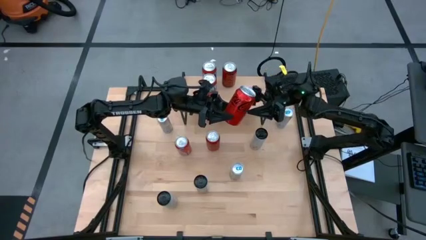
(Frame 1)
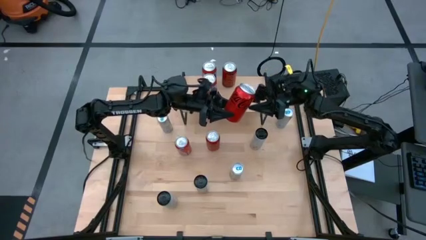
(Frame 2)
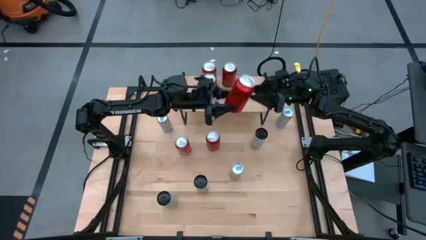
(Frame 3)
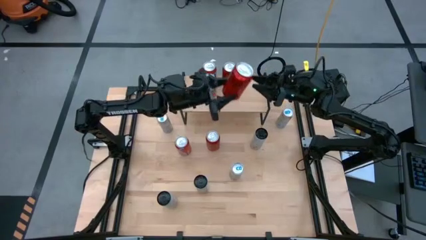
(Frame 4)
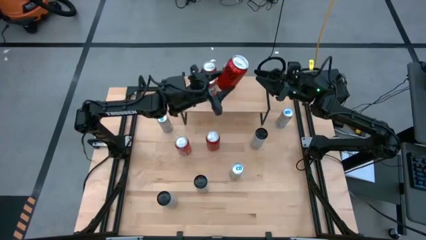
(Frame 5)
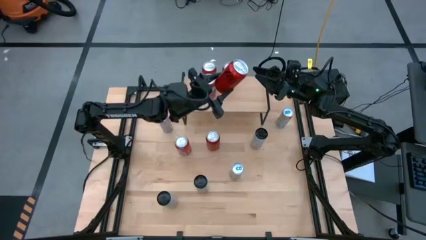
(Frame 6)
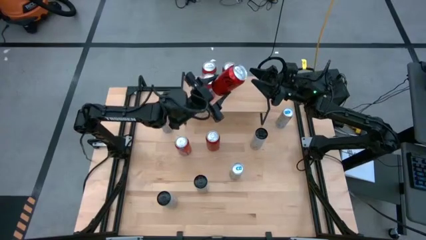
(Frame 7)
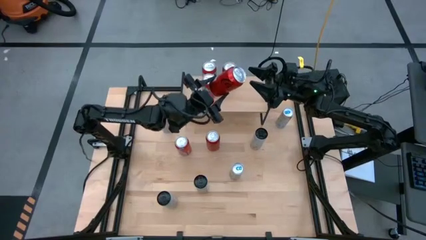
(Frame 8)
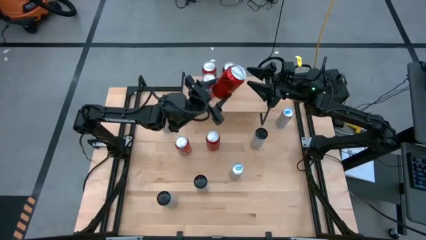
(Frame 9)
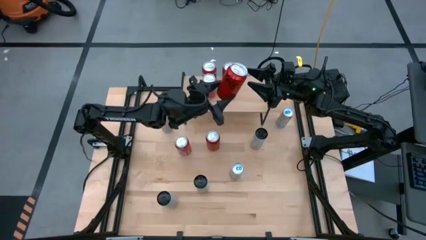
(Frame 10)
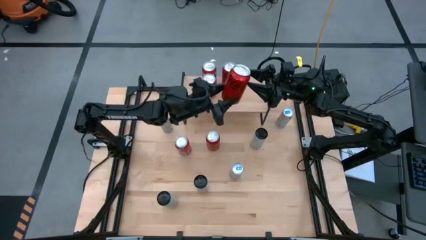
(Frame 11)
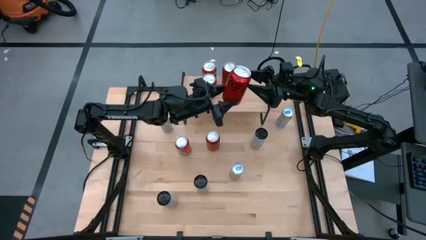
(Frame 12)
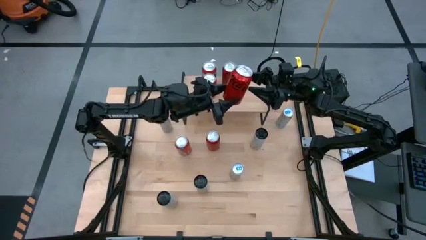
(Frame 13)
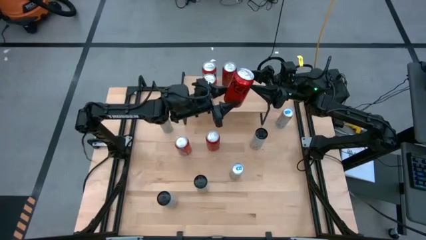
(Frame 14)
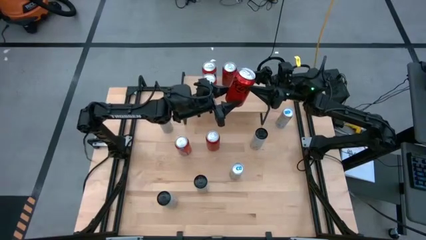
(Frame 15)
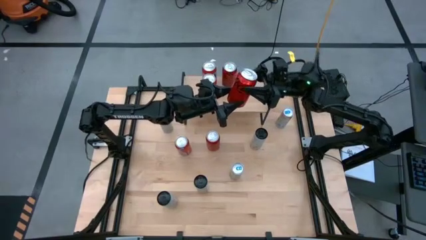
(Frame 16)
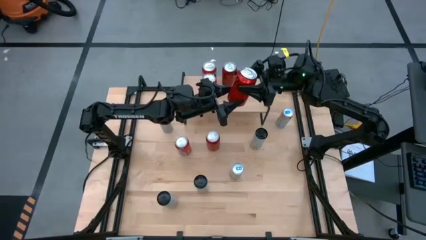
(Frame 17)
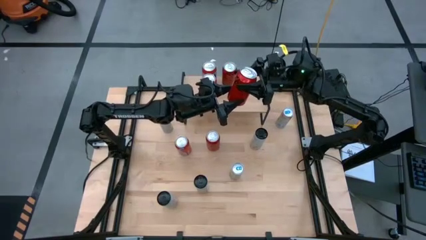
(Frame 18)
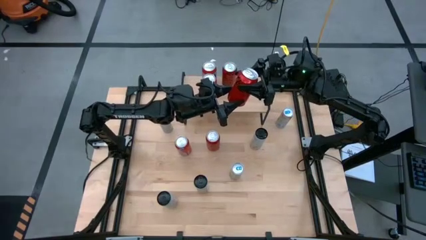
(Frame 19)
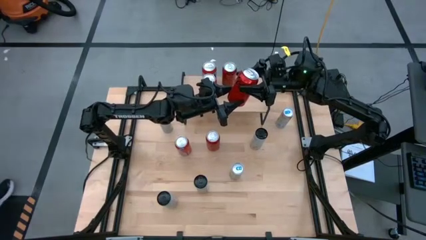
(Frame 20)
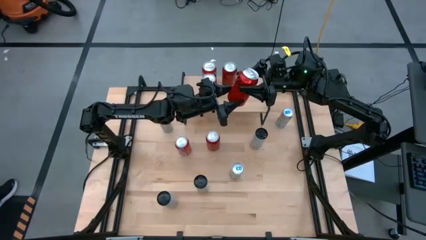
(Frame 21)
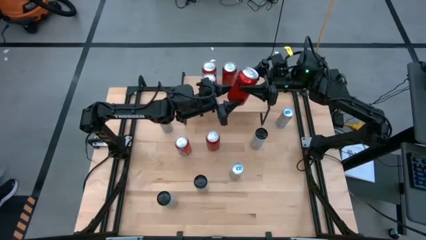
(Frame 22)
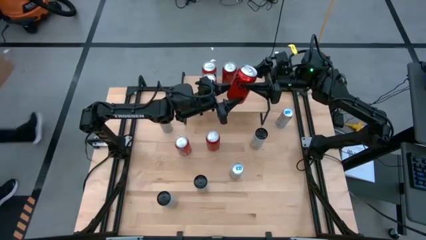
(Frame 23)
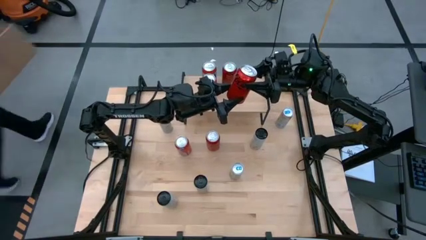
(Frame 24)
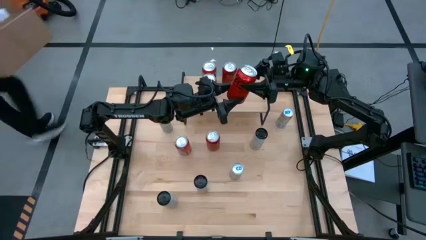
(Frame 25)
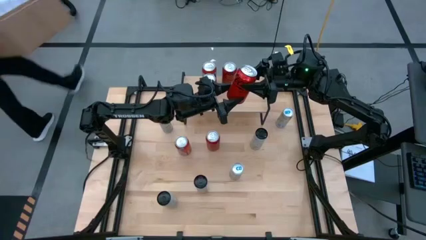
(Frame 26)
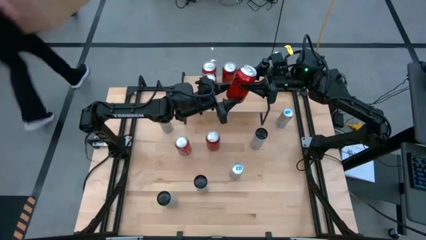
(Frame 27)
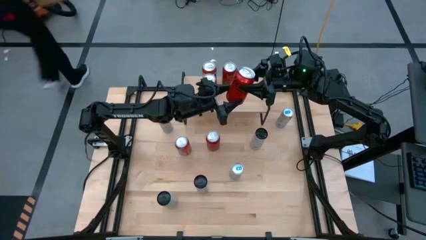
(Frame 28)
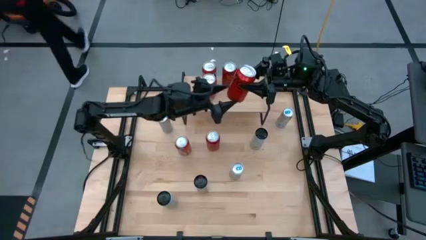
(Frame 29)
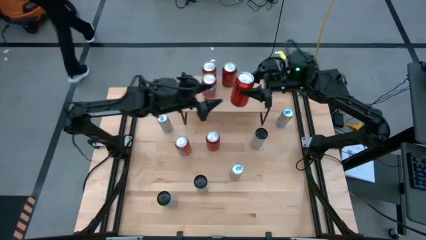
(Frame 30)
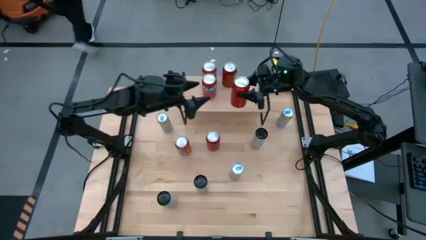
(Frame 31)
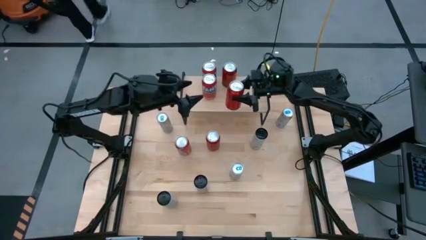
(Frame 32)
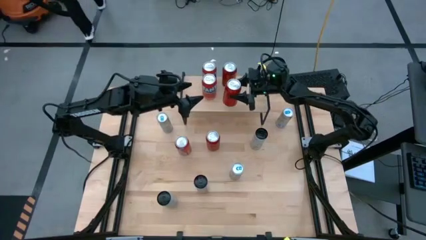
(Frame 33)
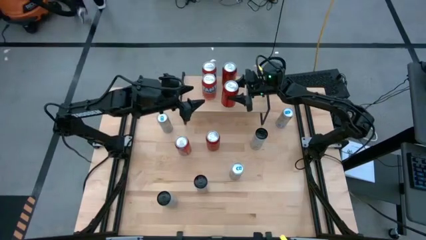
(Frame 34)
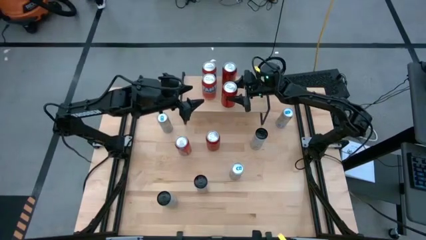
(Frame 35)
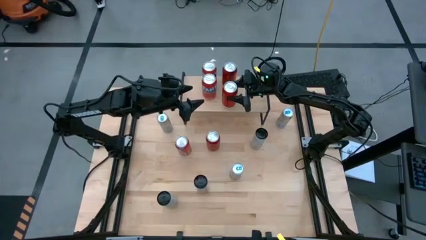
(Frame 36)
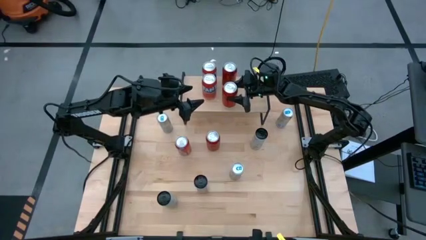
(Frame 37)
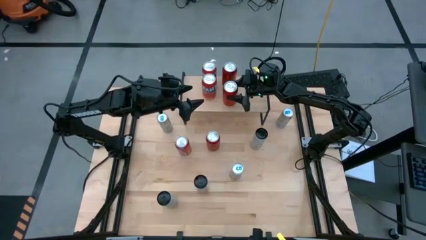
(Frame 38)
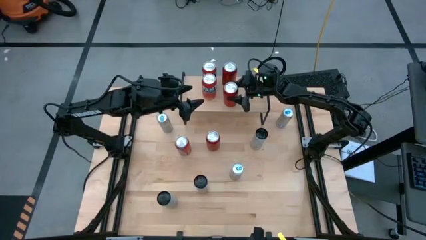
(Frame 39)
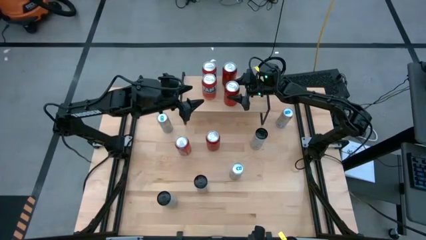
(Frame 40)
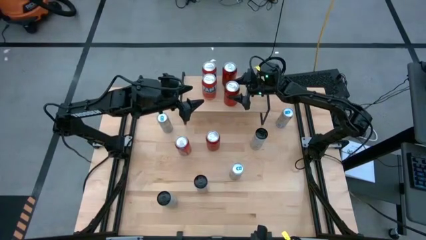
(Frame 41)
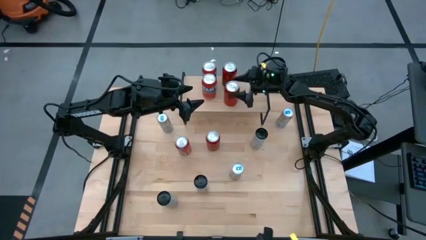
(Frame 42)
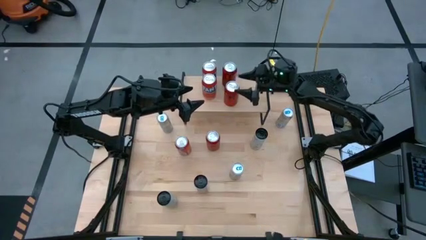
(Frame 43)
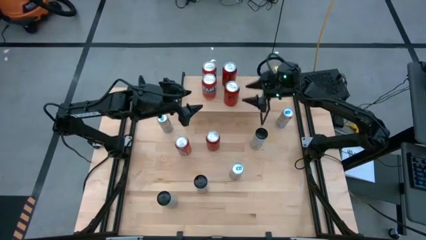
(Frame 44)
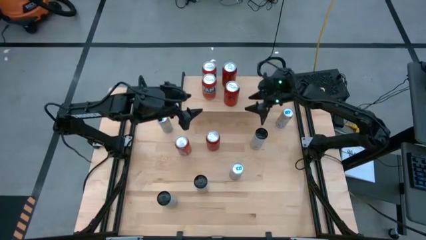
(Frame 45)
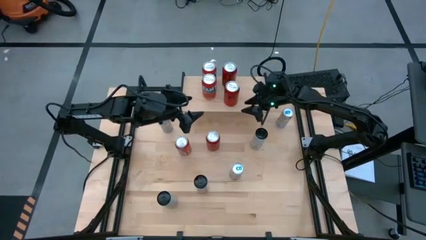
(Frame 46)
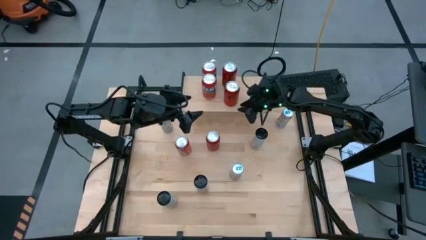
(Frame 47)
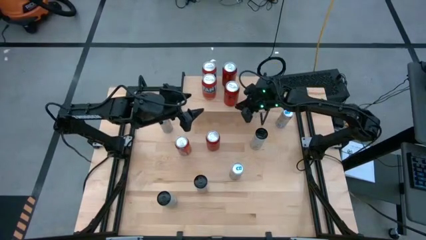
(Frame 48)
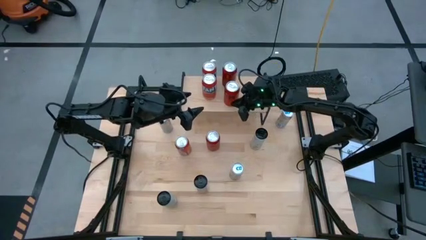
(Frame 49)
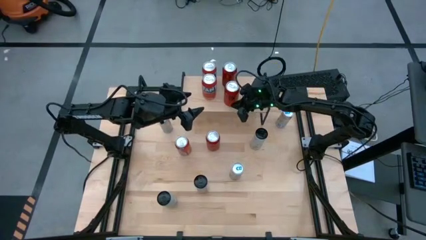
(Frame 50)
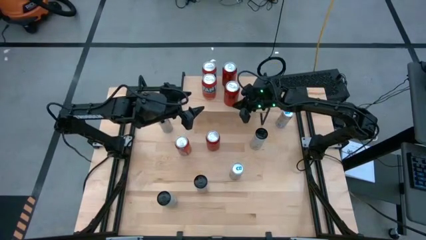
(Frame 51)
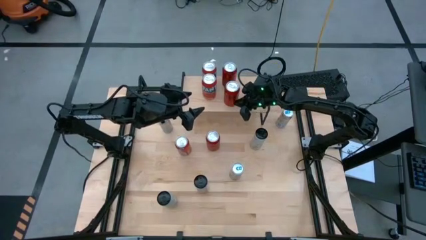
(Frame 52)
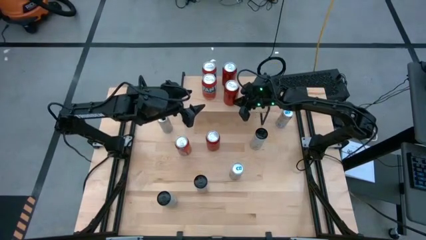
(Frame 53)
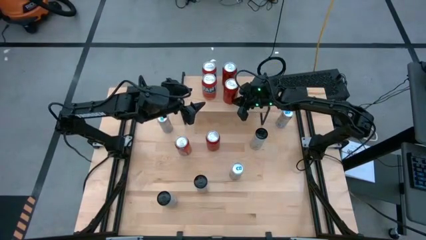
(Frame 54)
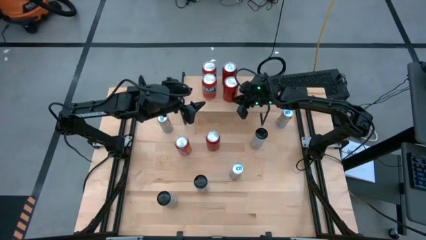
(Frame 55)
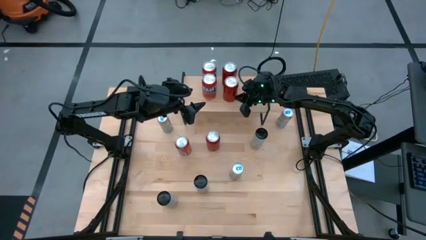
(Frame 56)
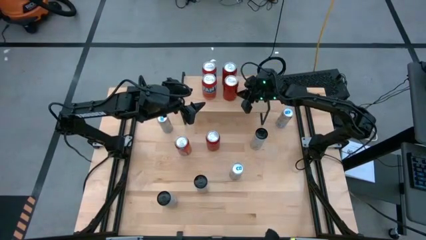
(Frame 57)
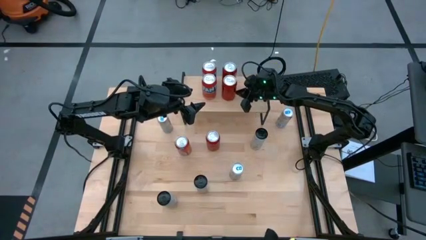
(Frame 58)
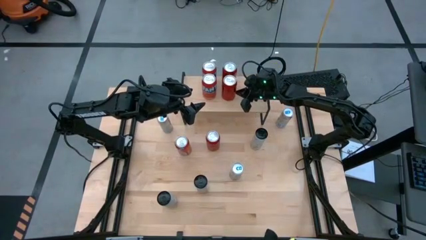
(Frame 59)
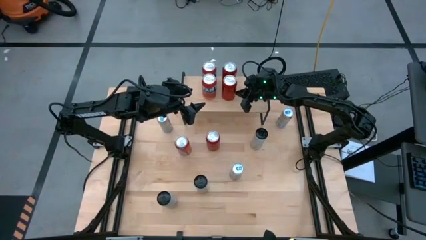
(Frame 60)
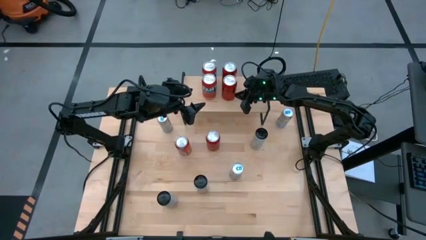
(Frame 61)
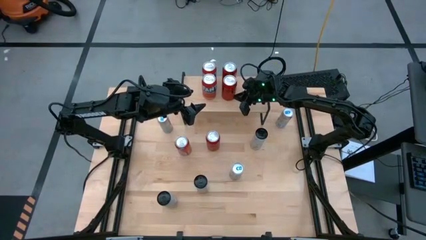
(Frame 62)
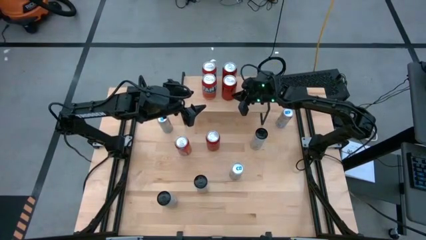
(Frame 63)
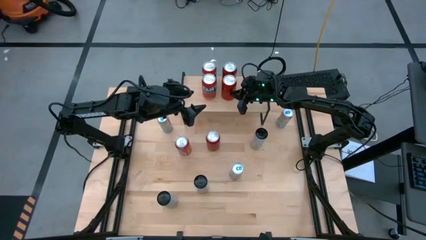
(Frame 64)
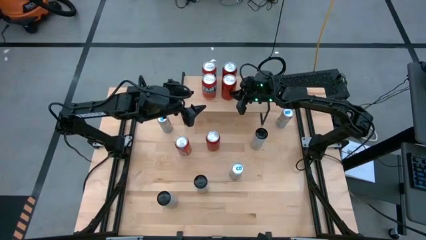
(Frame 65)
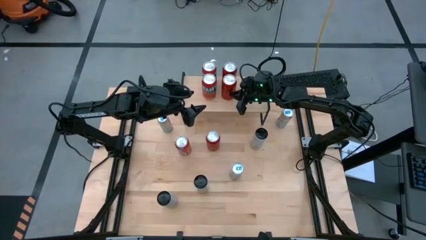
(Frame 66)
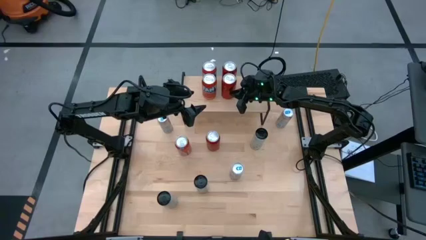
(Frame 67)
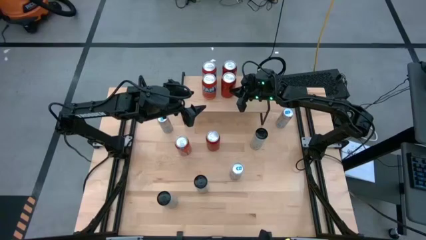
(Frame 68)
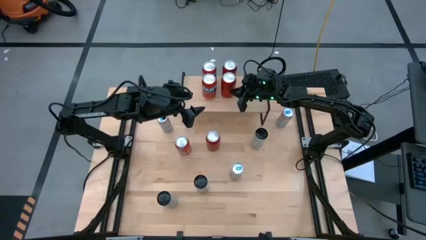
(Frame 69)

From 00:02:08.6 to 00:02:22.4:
Task: Place canned beverage on shelf
Put the bottom red-black soda can on the shelf aligned with the other red-black soda can

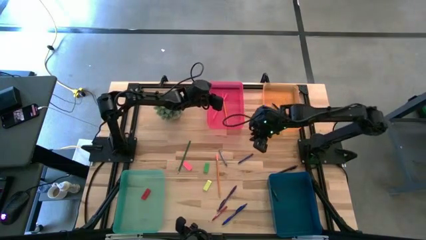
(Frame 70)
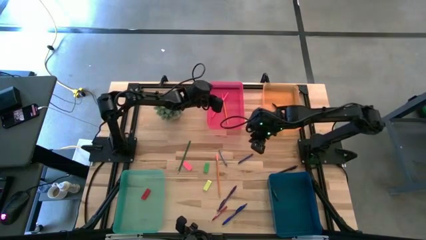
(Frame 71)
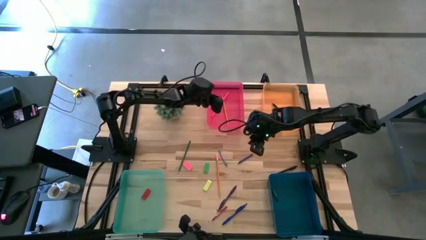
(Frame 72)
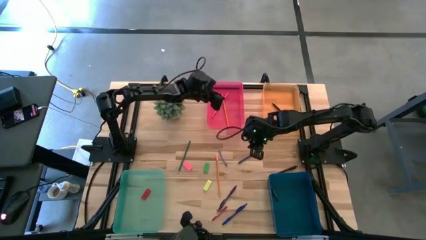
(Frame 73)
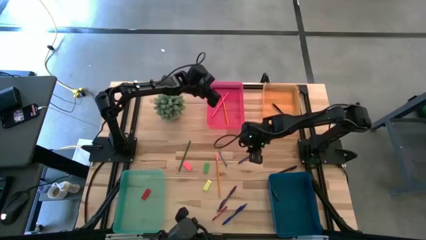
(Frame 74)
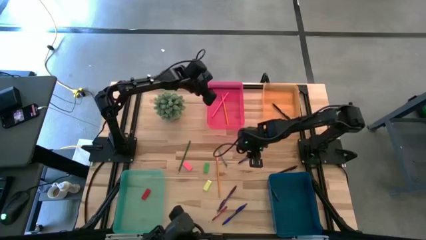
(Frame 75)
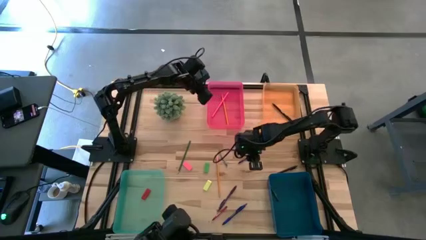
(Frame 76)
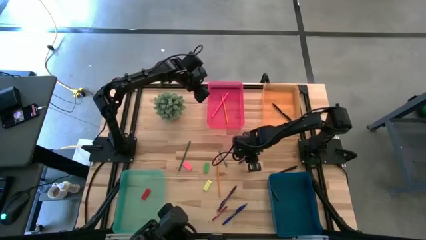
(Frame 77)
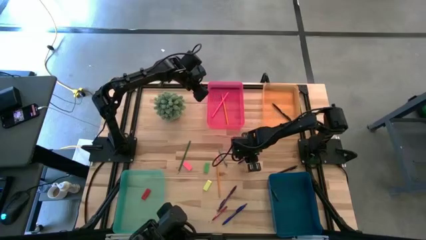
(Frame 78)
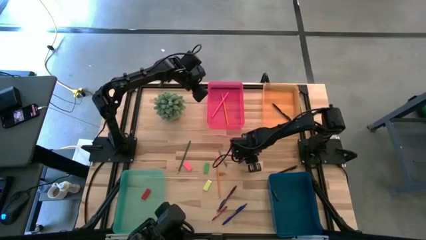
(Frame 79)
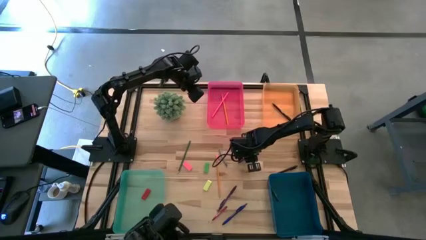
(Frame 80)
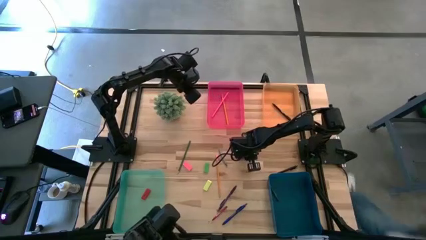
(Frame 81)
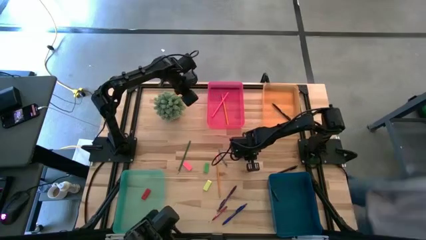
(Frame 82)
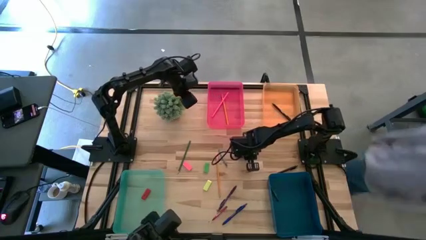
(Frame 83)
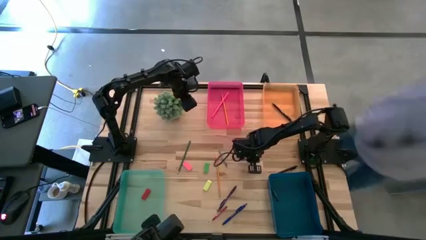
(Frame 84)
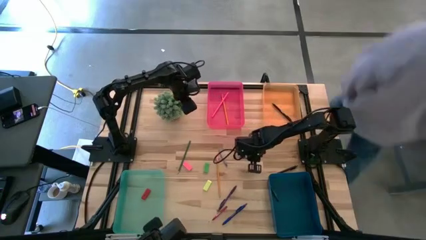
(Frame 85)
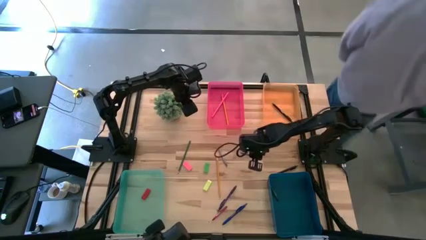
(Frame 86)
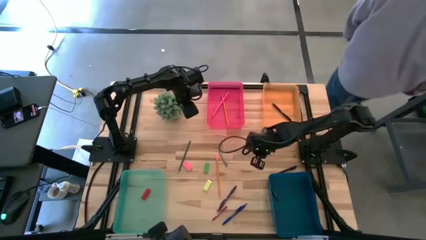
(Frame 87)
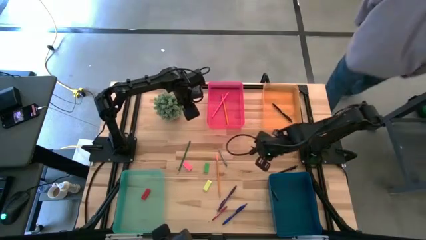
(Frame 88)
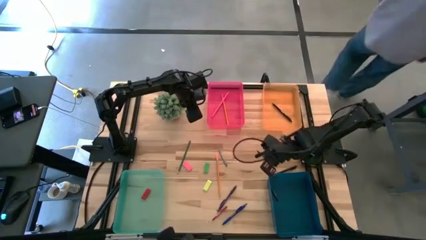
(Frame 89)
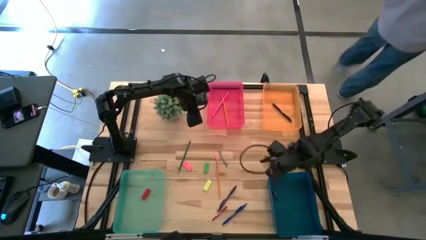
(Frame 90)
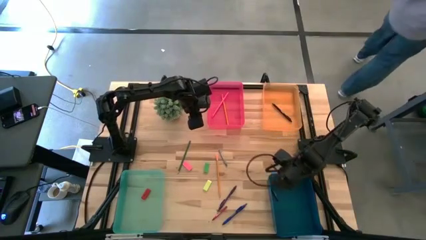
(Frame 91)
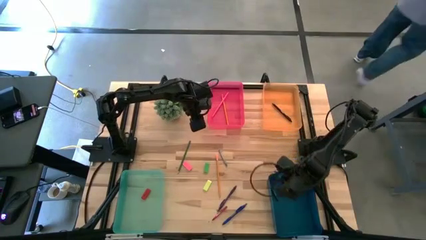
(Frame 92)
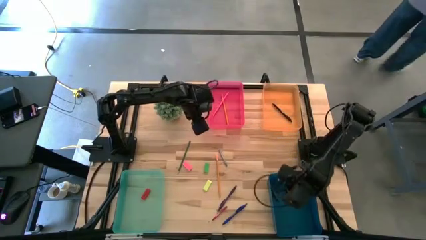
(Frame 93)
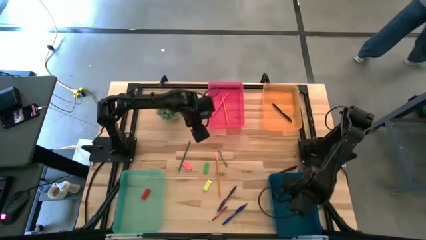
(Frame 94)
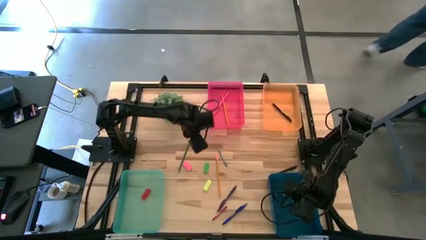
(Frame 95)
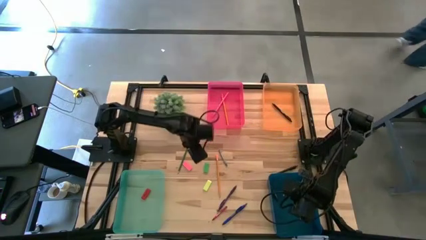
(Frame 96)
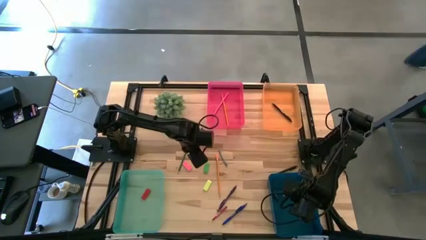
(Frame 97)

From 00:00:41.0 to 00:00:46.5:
Task: Sort crayons/erasers/pens/pencils in bins
Put the blue crayon into the blue bin
